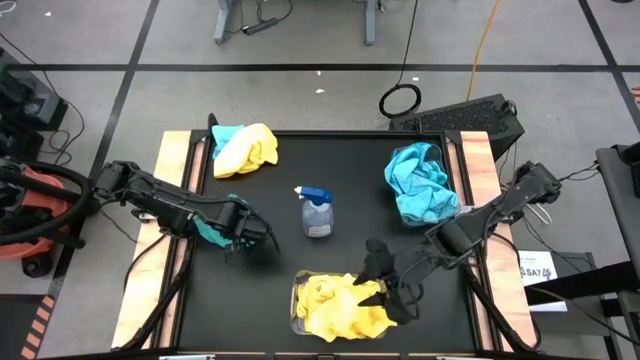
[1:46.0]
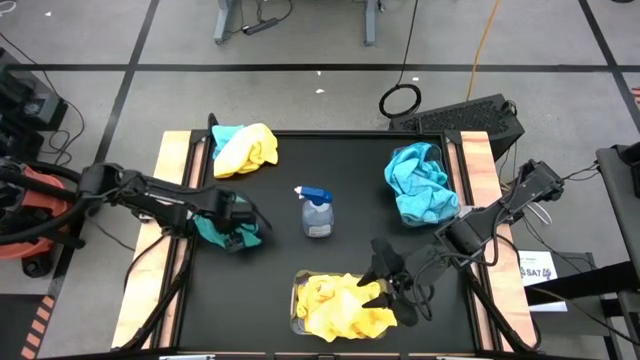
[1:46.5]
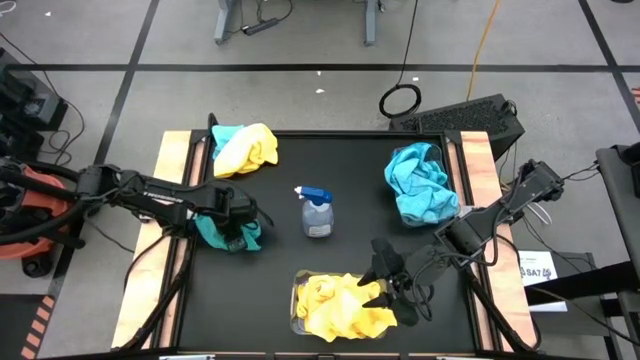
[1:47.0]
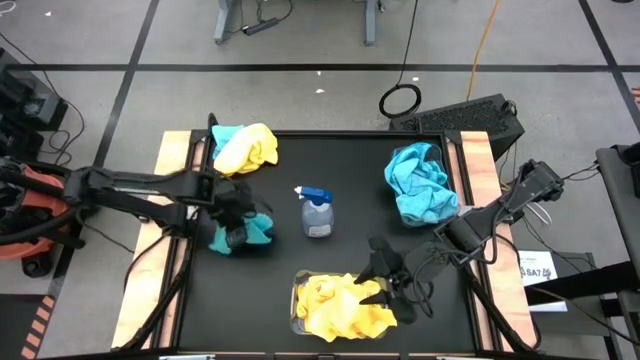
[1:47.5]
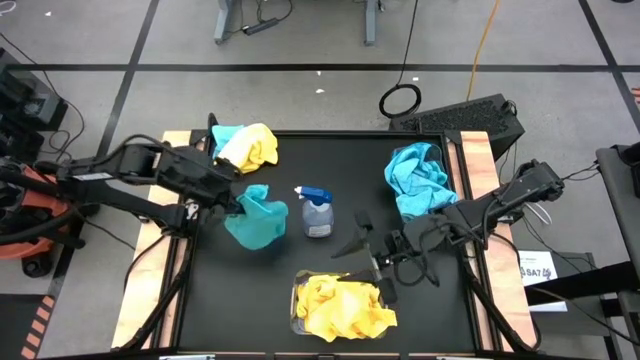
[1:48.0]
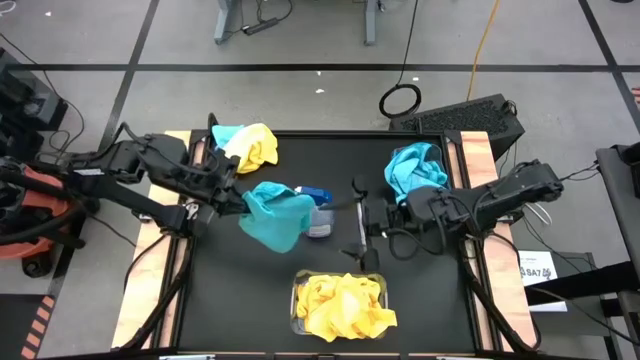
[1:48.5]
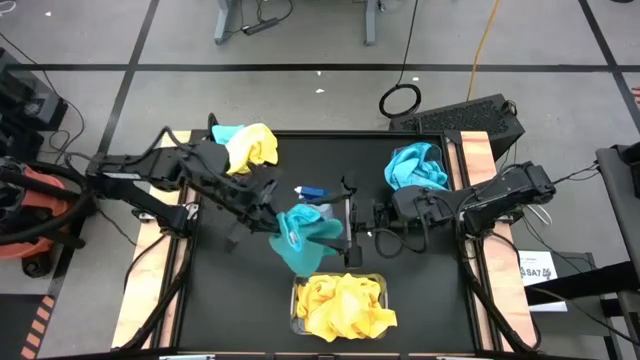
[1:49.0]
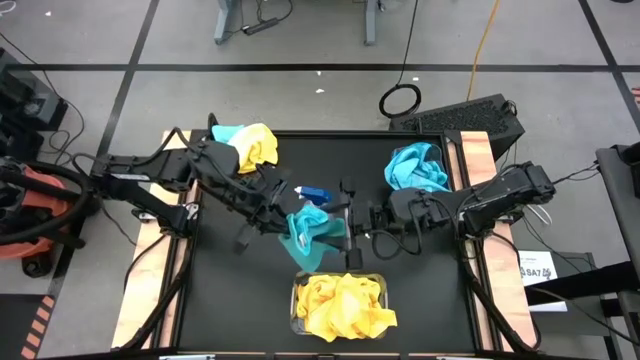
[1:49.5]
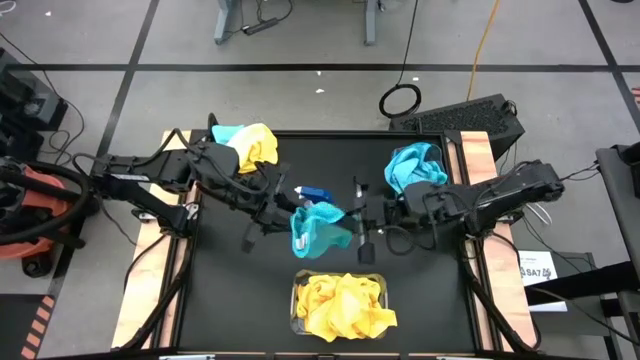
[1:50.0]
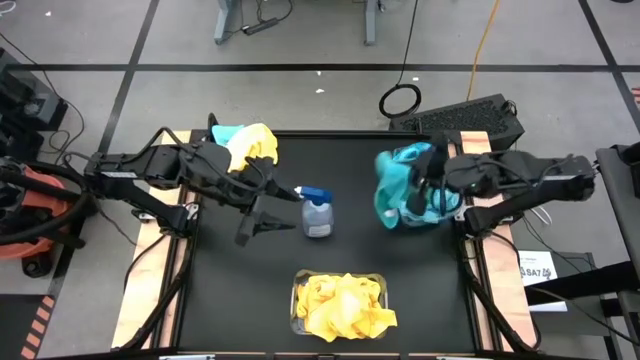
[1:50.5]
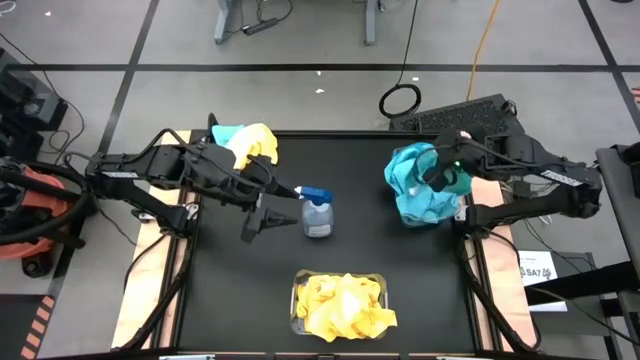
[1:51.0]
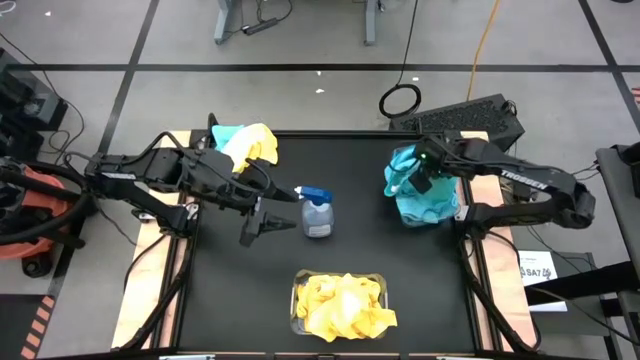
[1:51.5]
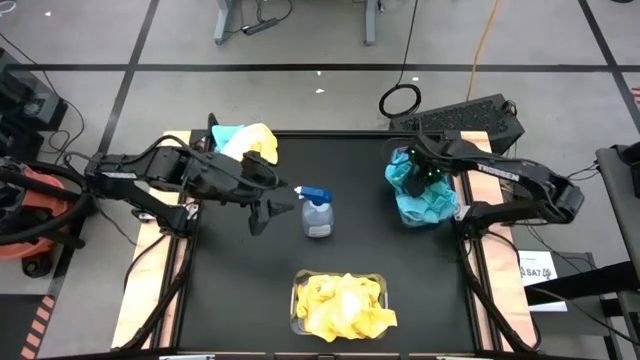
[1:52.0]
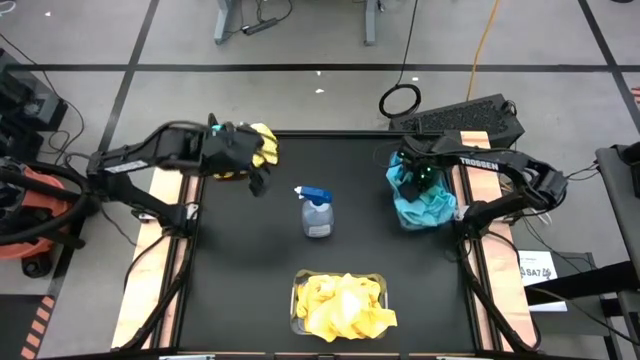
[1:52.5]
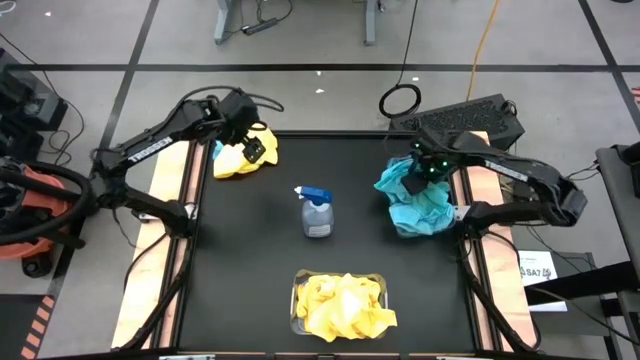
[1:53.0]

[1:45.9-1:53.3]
Task: Sort microfiber towel by color & place in baskets
Put the blue towel into the top transparent bin

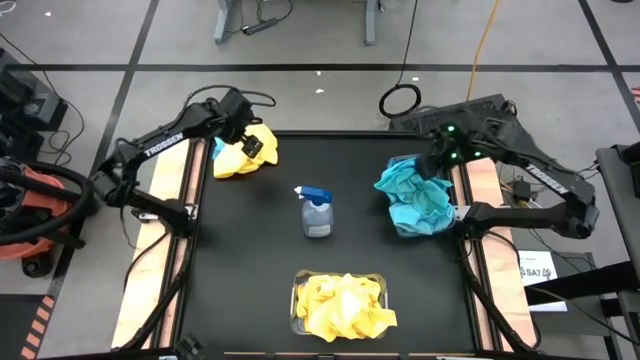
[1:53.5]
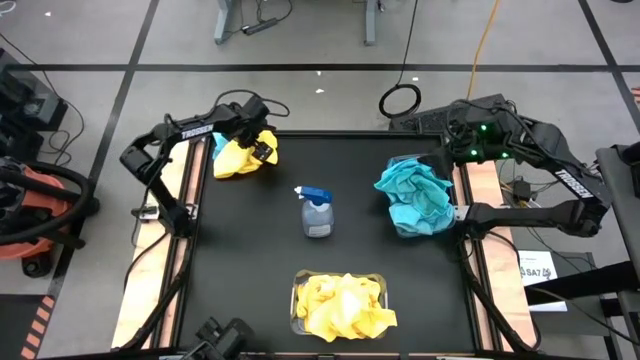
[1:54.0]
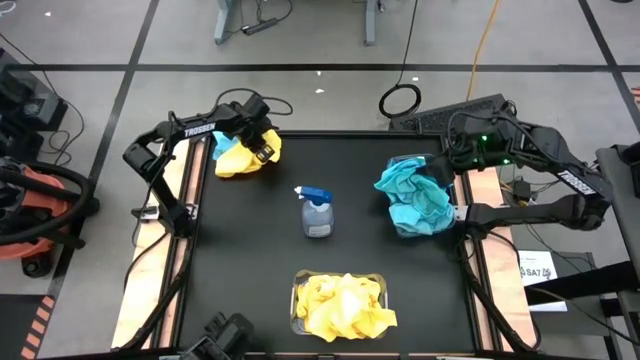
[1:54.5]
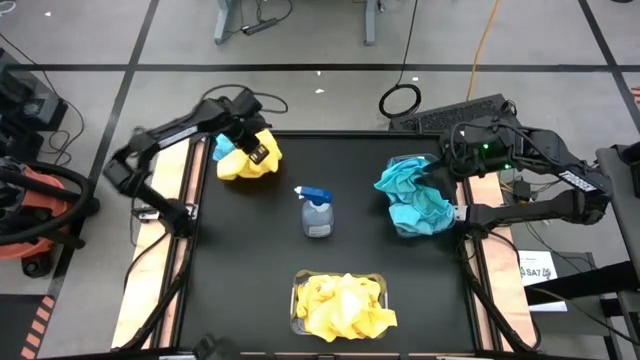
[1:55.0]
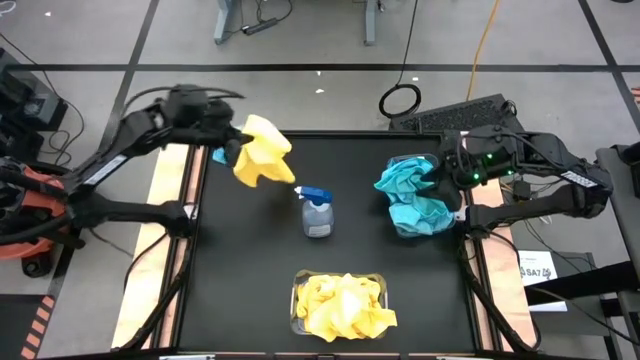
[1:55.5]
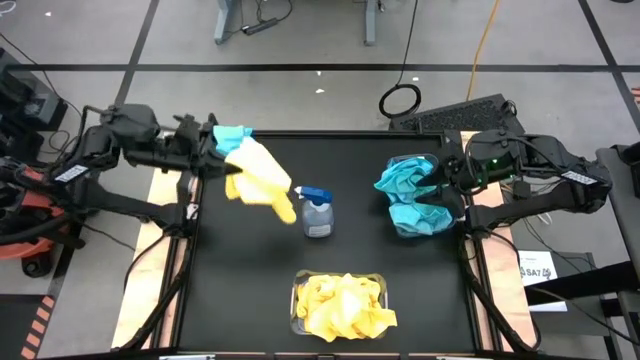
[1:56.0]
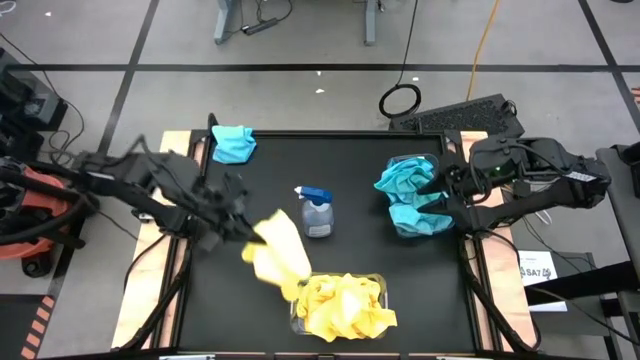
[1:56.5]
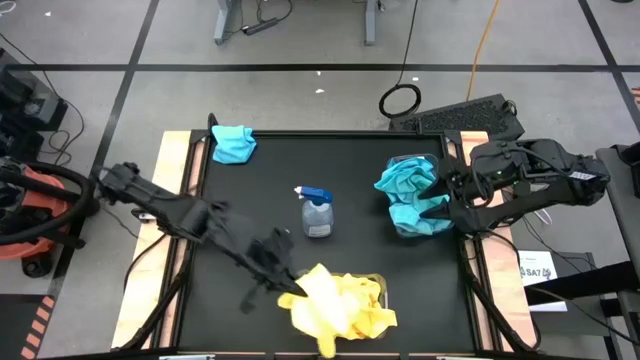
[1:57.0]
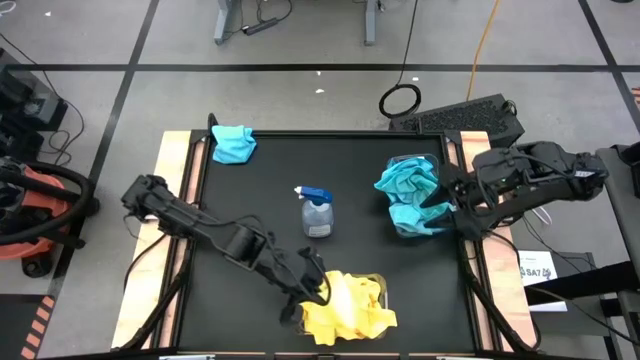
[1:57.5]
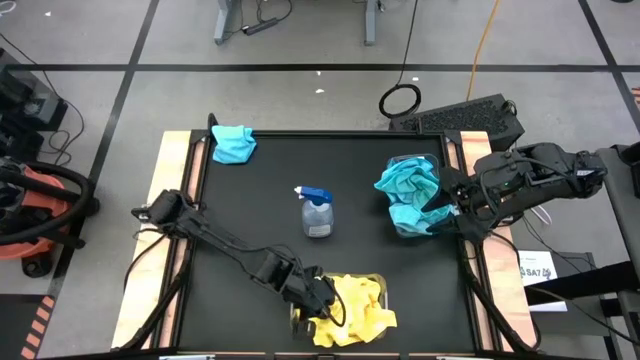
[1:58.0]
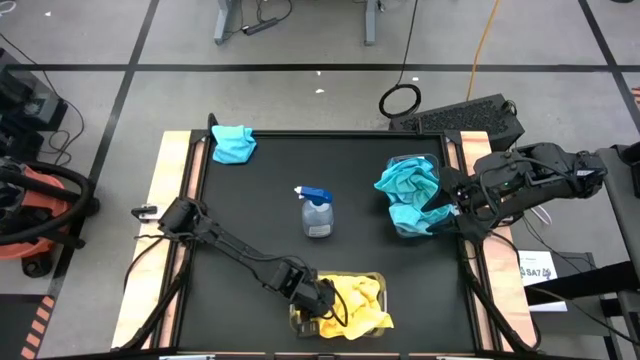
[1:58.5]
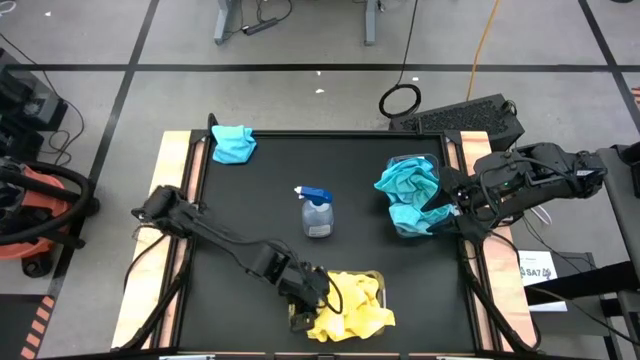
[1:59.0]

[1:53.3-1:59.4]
Put the yellow towel into the bottom transparent bin

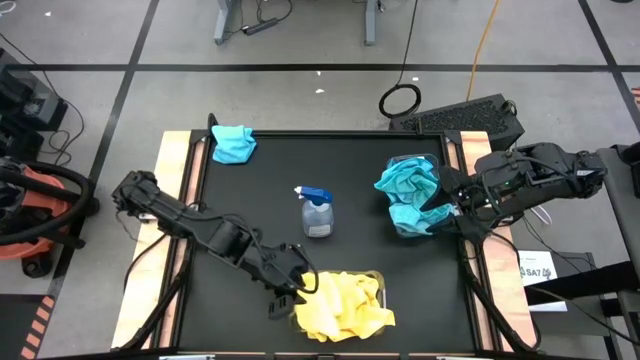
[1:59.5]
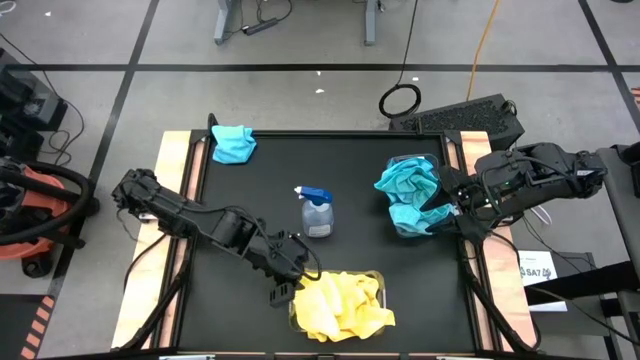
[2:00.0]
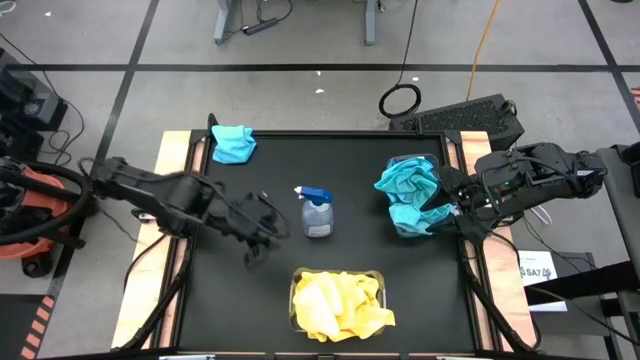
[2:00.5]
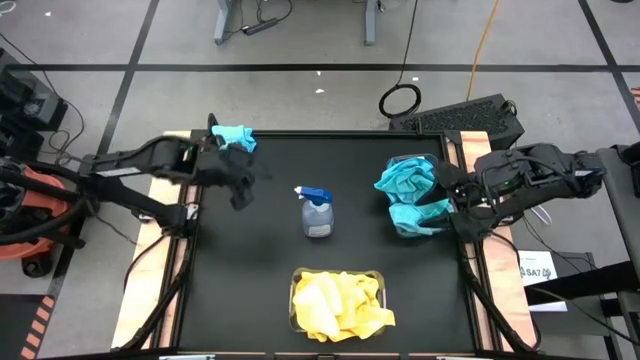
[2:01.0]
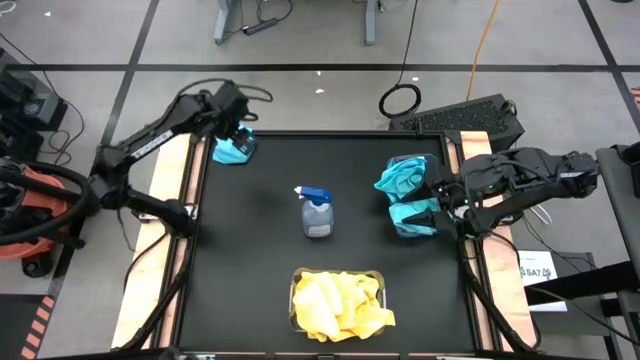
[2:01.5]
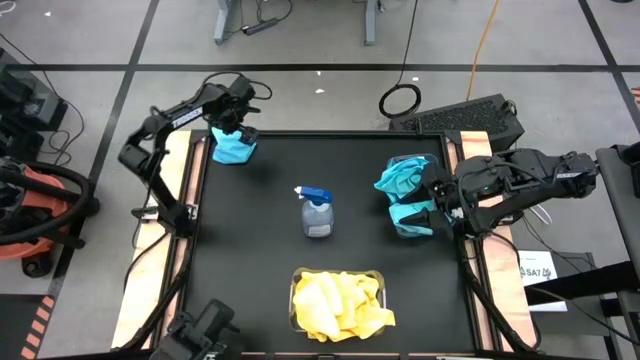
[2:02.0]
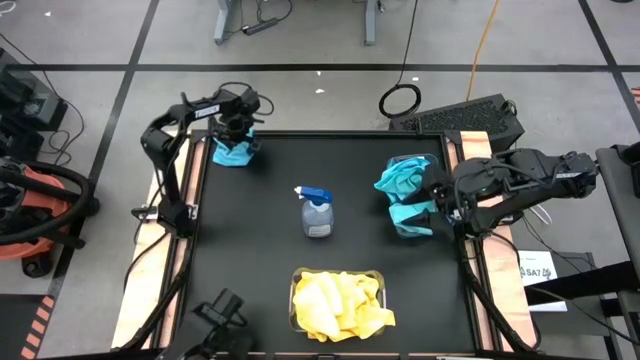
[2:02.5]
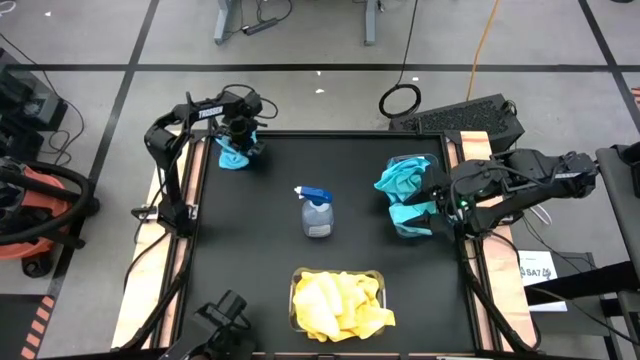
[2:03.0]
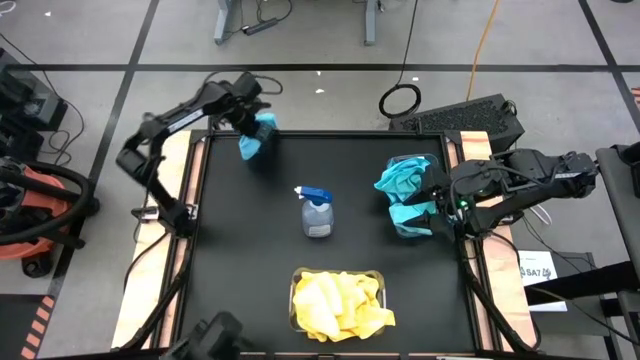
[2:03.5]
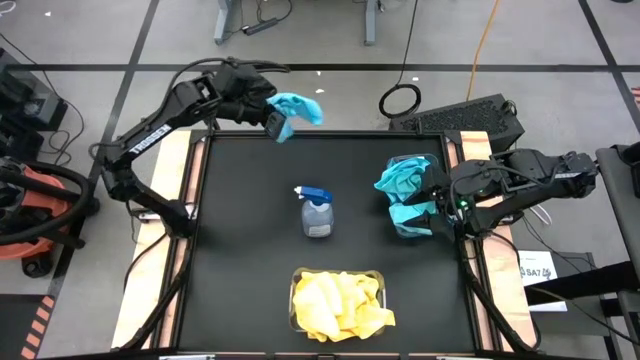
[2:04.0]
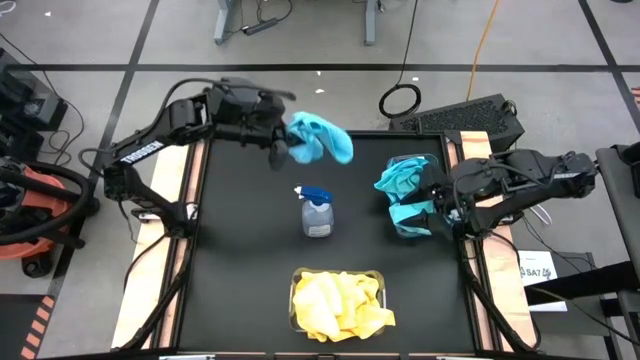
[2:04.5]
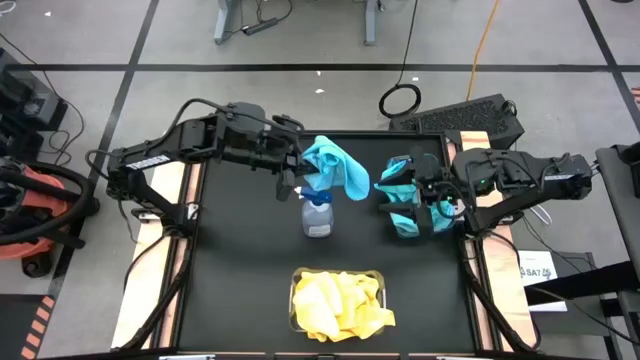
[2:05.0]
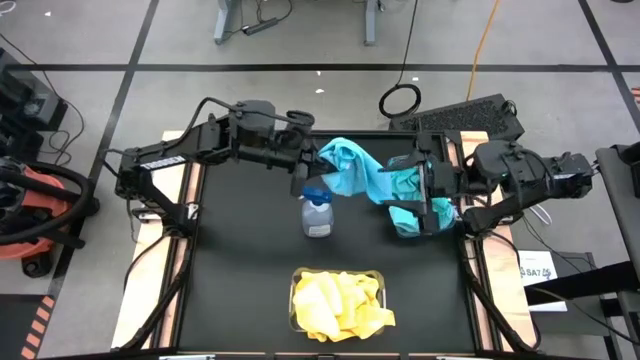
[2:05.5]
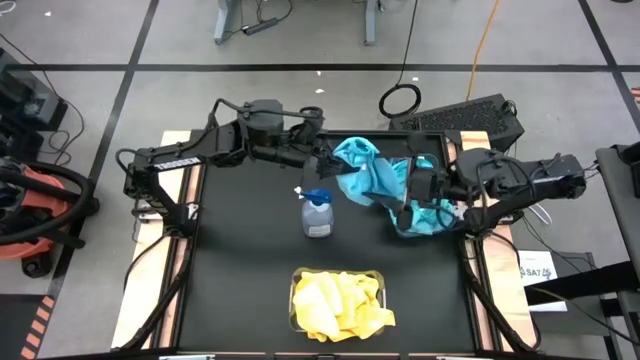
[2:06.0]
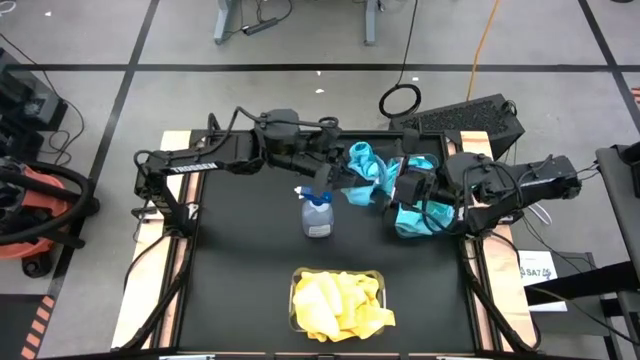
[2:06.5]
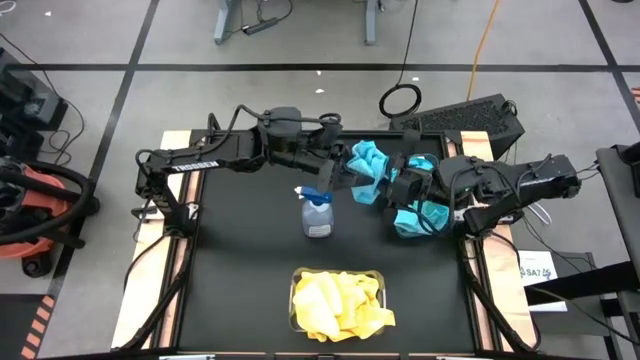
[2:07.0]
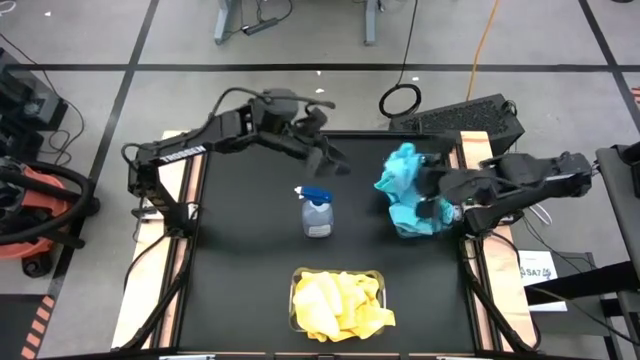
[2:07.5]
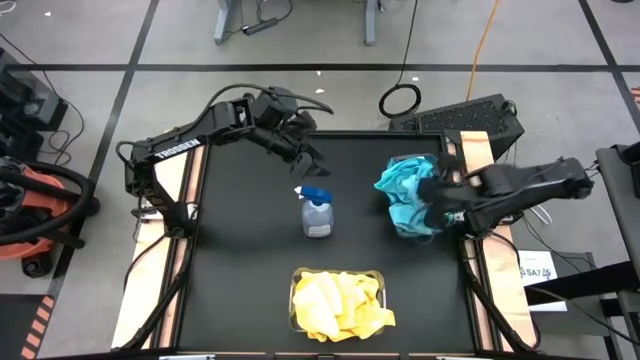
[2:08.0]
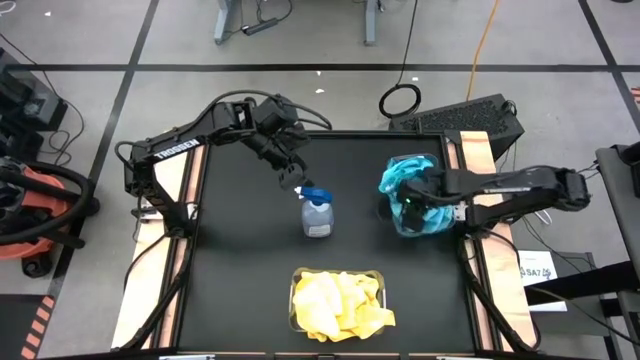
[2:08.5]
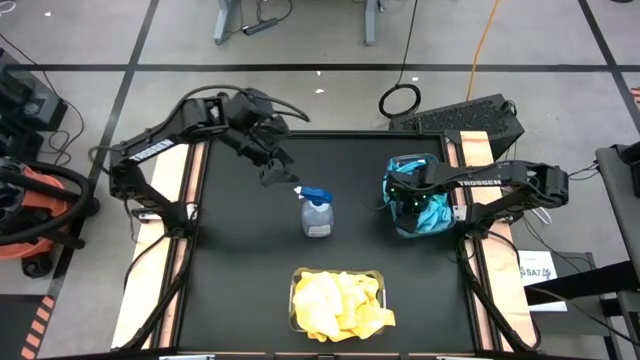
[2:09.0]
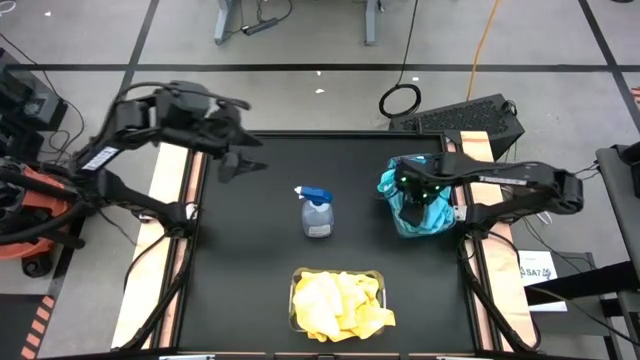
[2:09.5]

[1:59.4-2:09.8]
Put the blue towel into the top transparent bin
